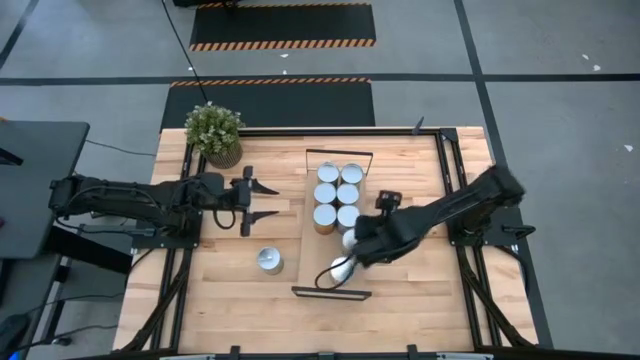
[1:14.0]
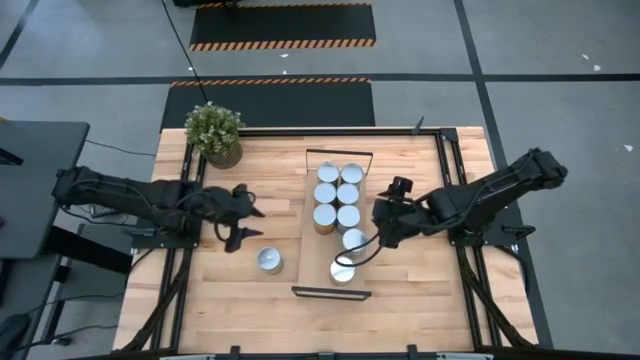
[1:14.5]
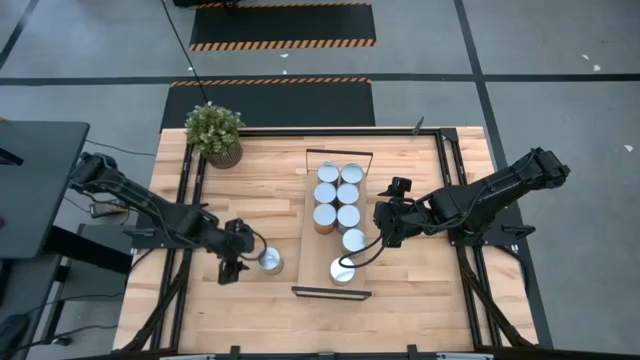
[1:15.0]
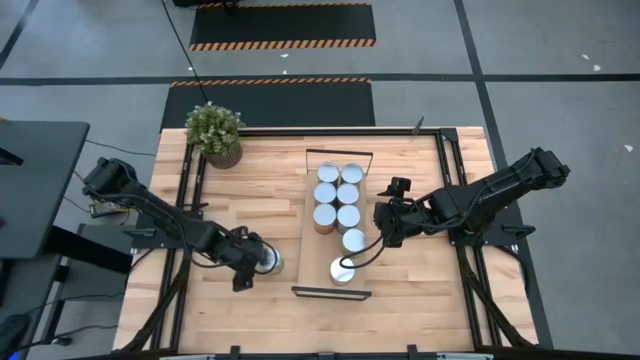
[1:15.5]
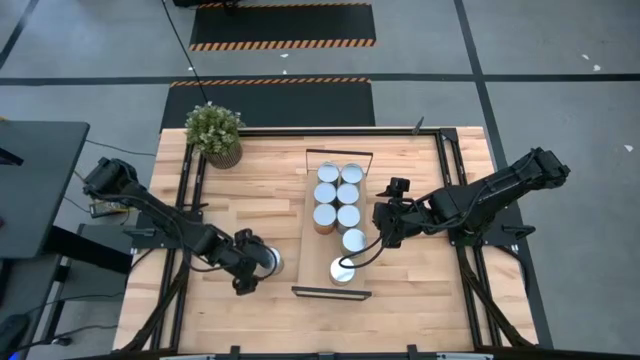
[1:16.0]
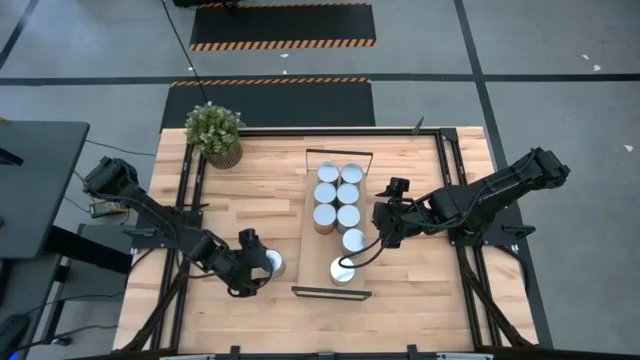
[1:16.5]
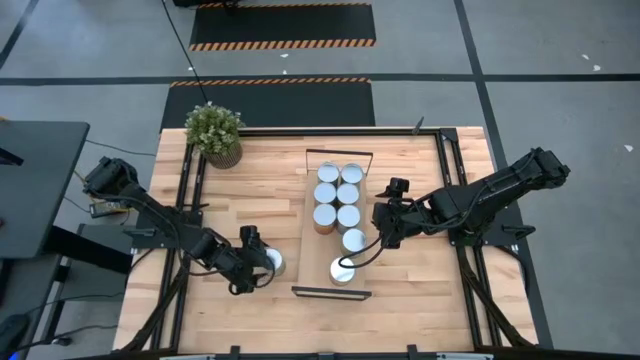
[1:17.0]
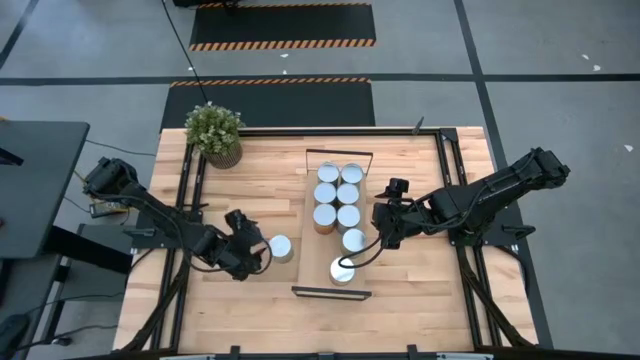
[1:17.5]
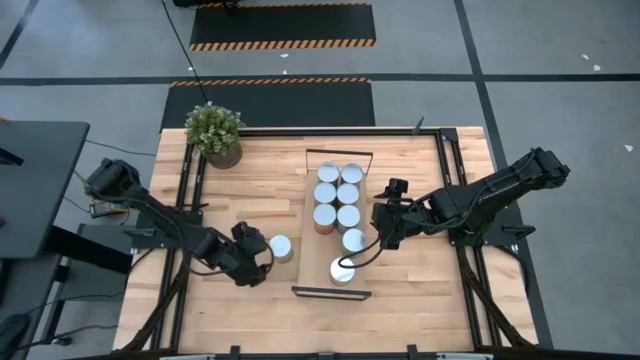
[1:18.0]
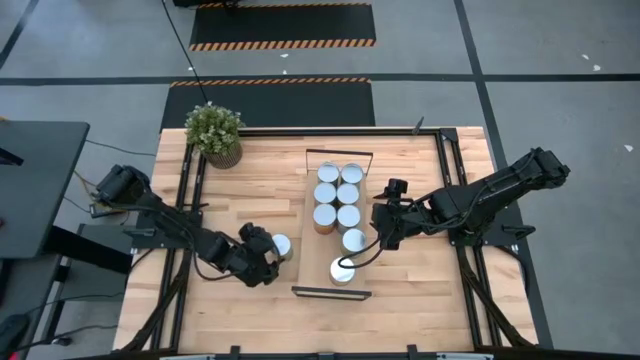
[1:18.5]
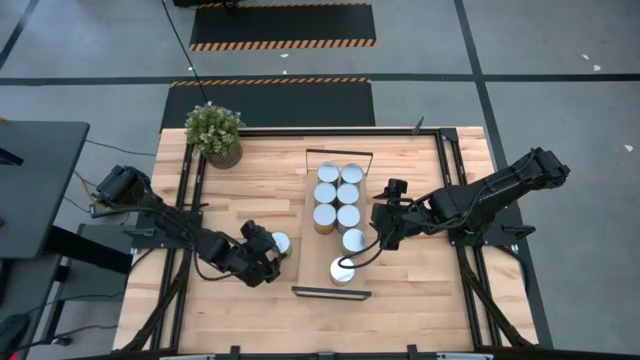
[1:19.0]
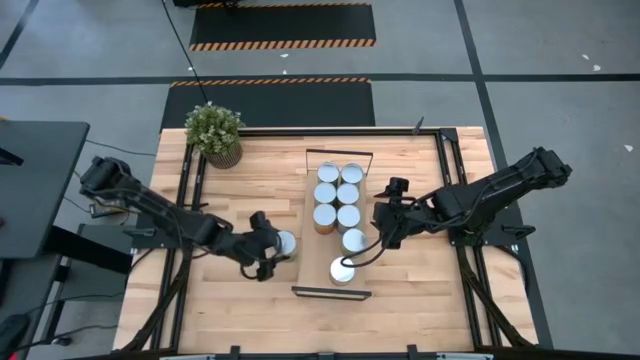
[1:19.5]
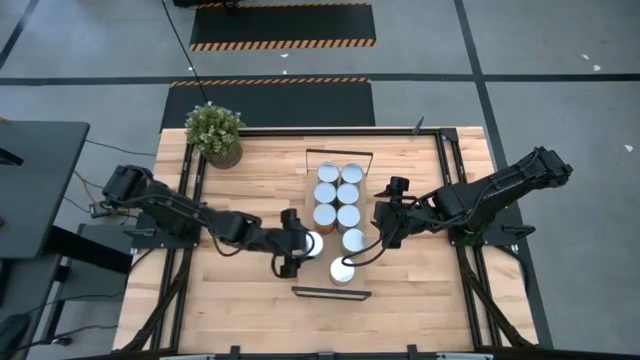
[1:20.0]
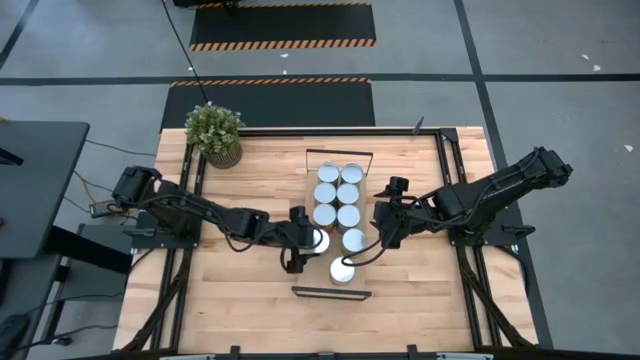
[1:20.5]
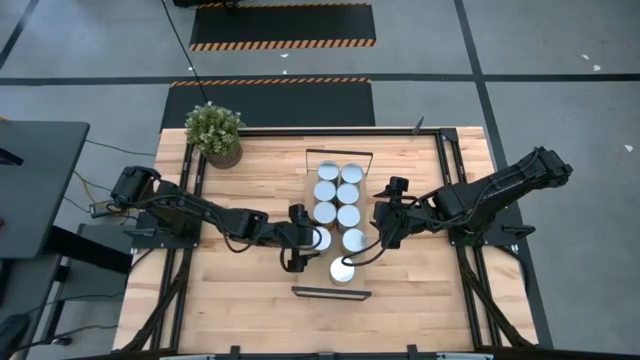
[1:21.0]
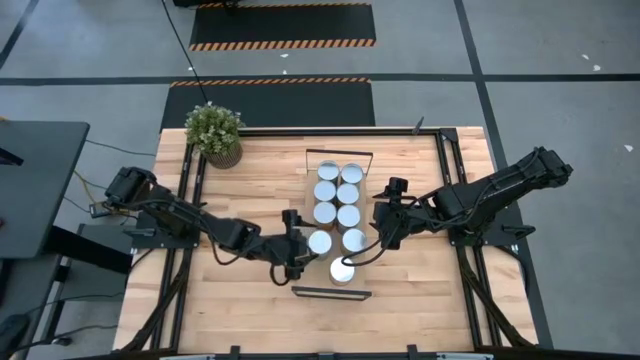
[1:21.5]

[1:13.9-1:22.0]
Task: Pick and place cans onto a shelf
Put the canned oranges on the shelf

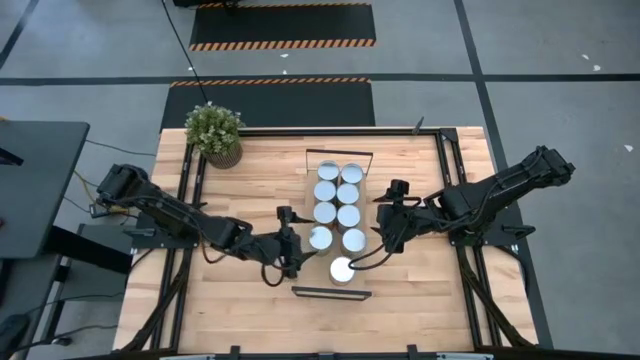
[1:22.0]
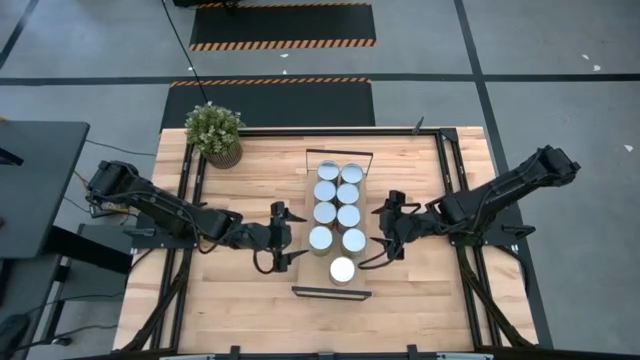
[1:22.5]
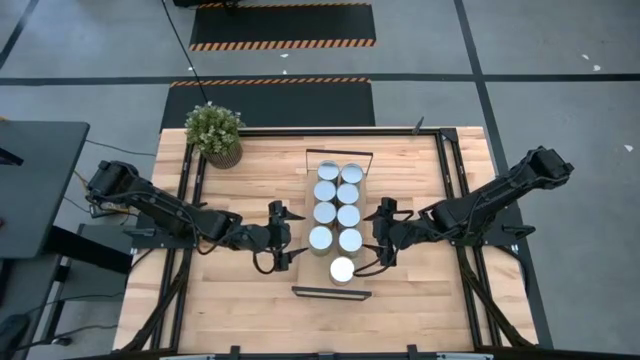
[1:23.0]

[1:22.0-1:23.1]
Adjust the canned pears can on the shelf

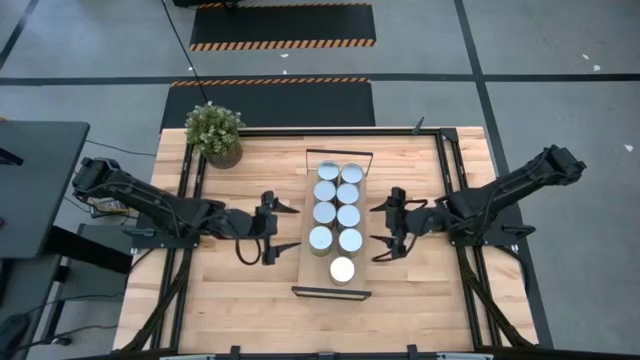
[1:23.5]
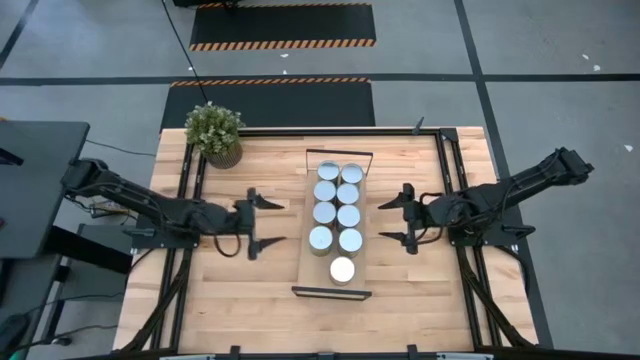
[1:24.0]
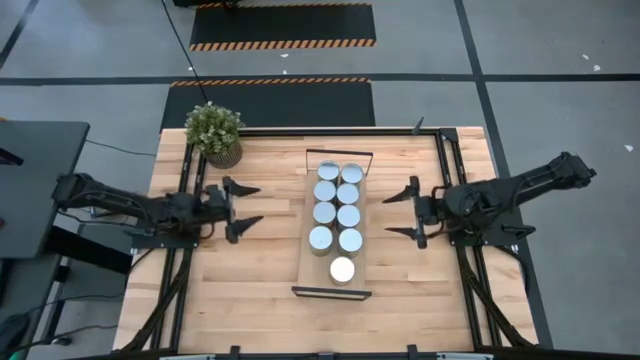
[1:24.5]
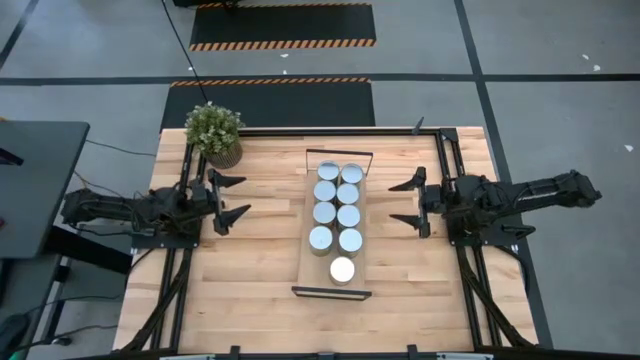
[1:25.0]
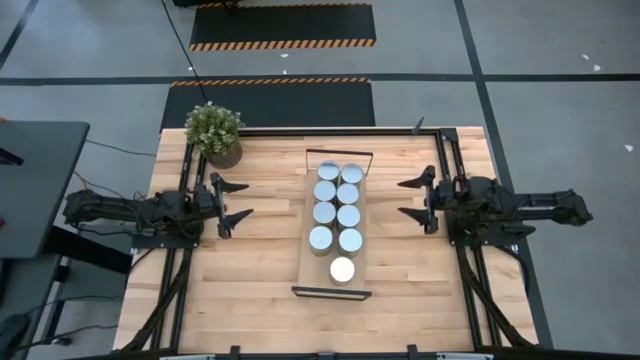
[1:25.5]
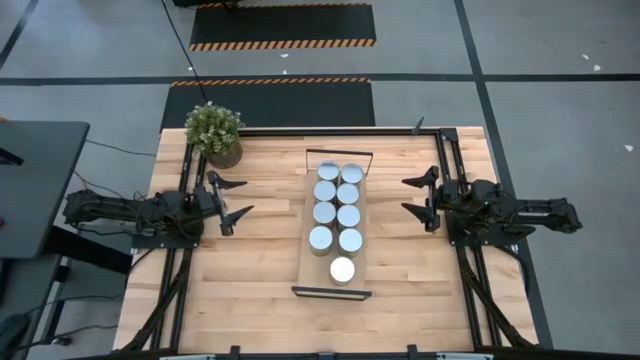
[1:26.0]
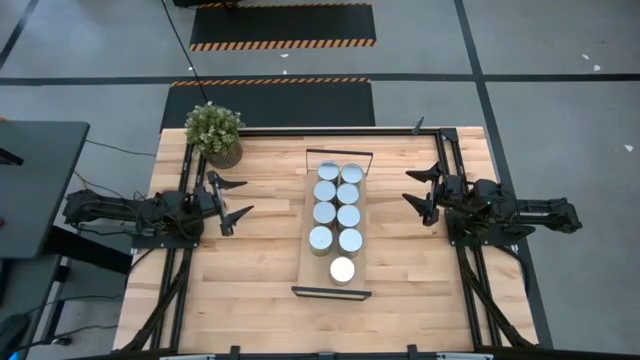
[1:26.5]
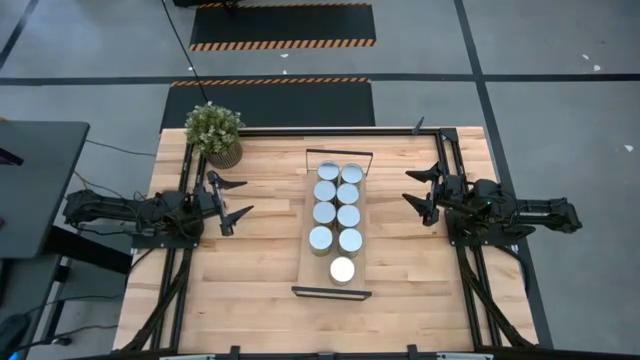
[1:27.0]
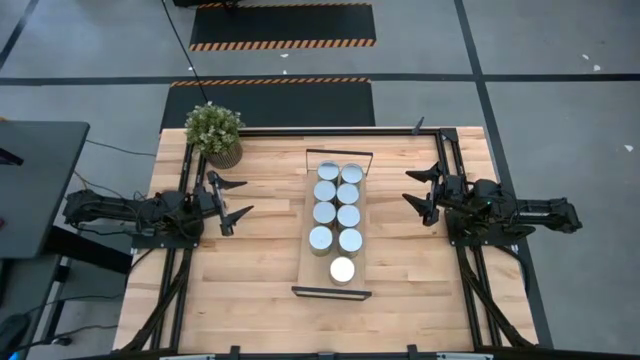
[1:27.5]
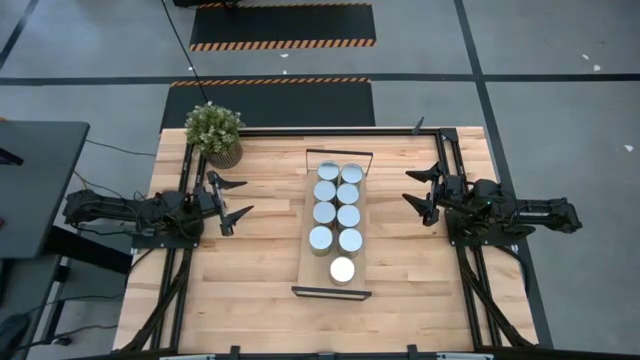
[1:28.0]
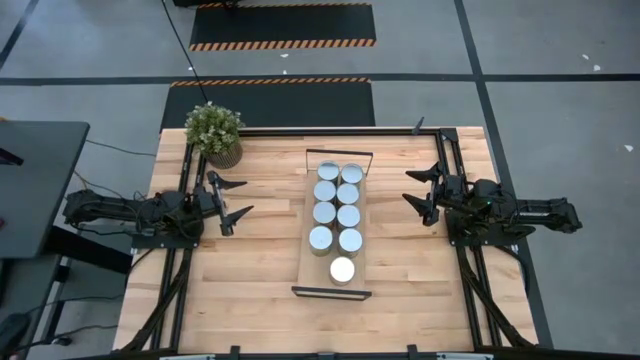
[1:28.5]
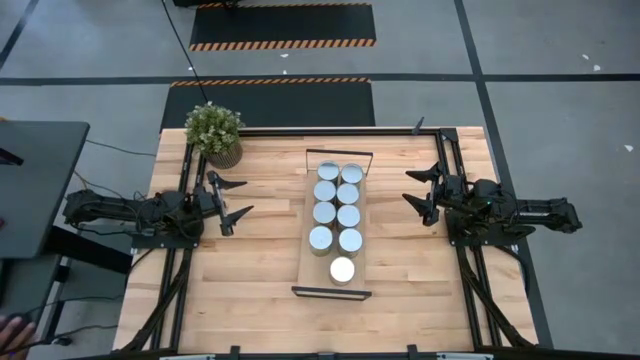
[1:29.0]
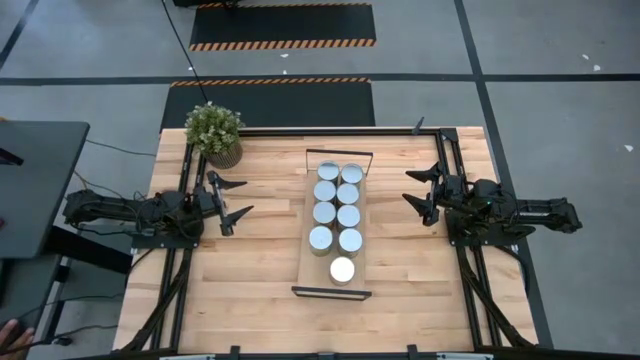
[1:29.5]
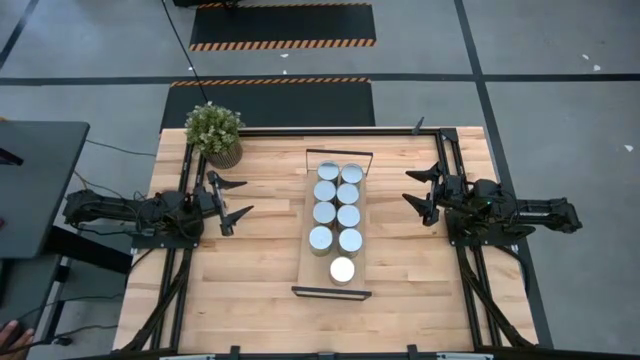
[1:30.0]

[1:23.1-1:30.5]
Return to Home Position

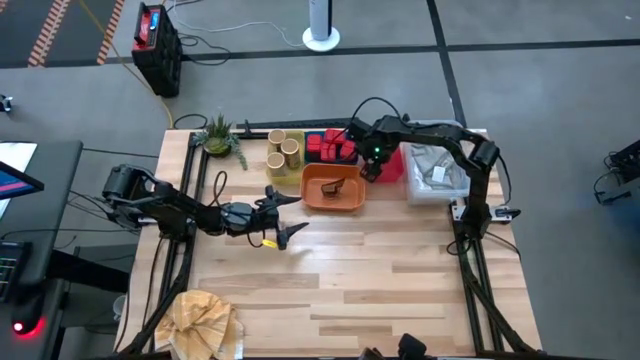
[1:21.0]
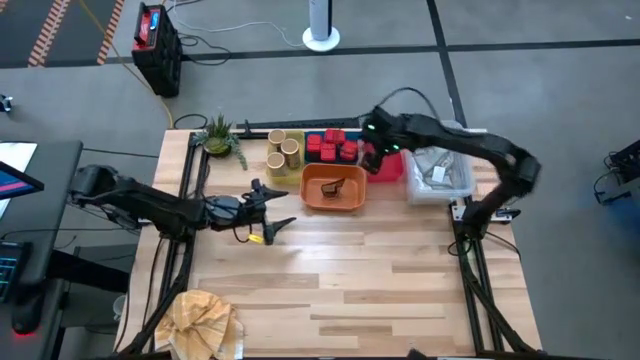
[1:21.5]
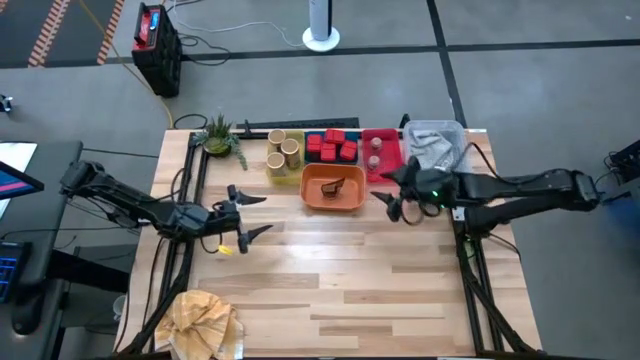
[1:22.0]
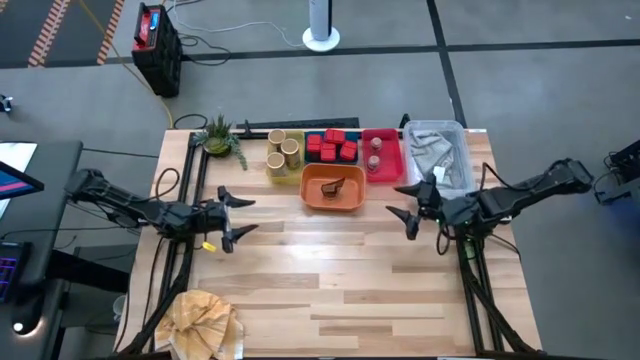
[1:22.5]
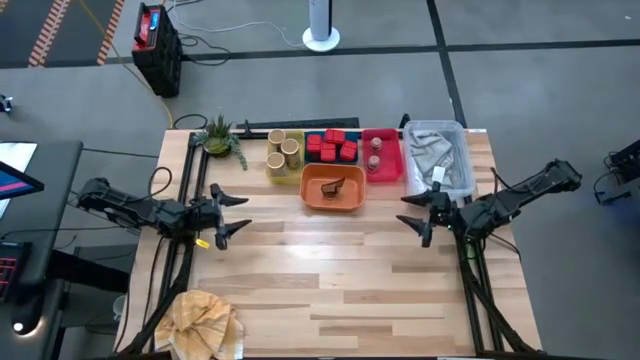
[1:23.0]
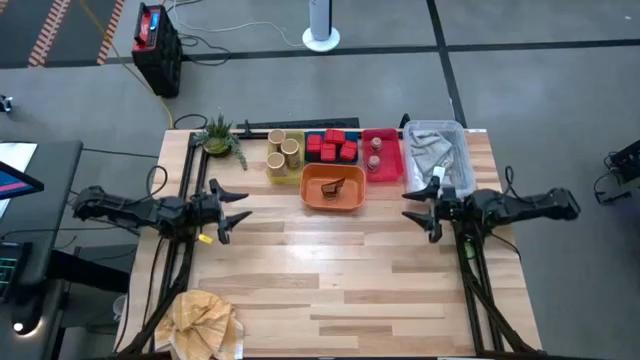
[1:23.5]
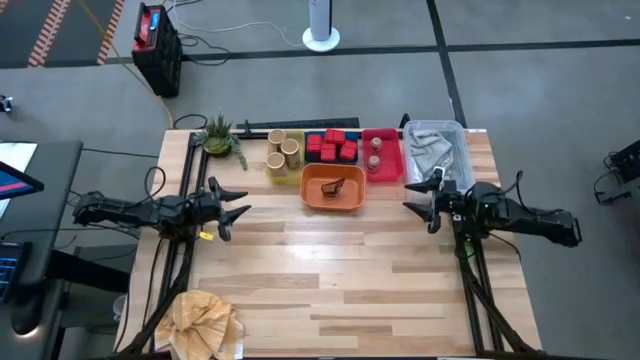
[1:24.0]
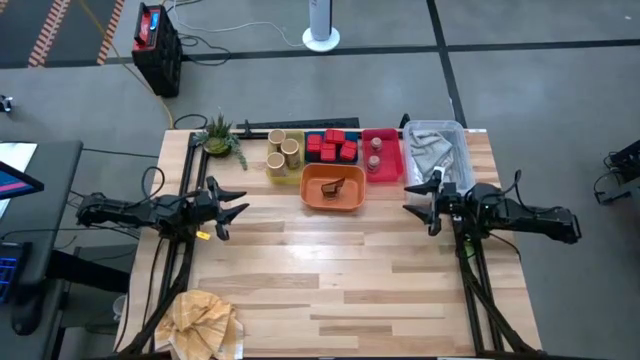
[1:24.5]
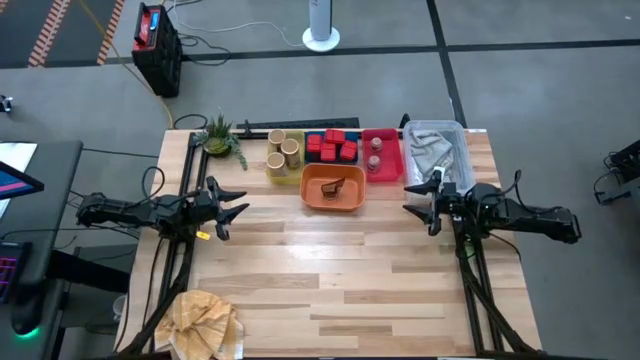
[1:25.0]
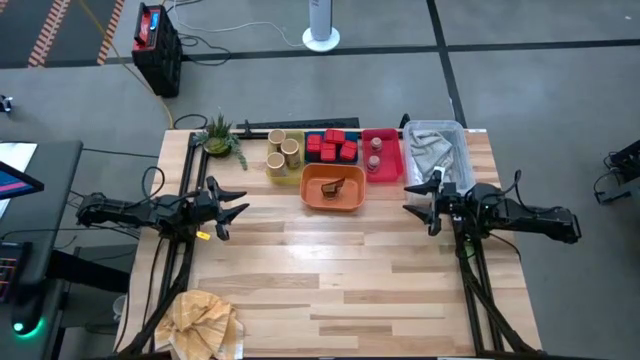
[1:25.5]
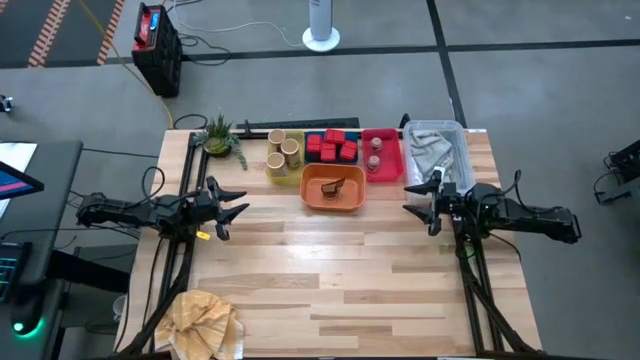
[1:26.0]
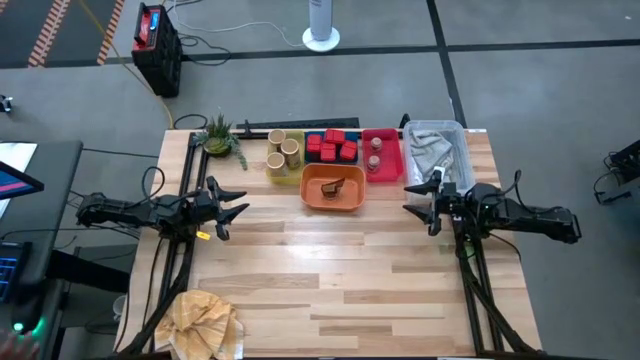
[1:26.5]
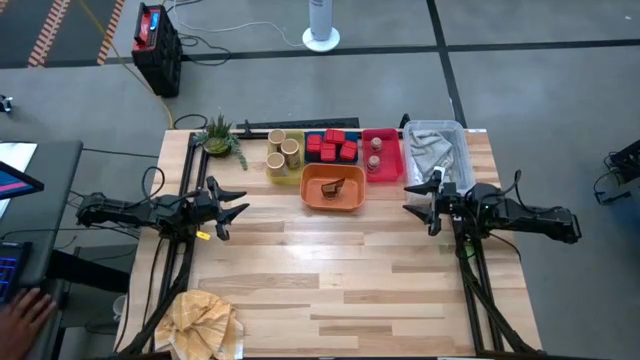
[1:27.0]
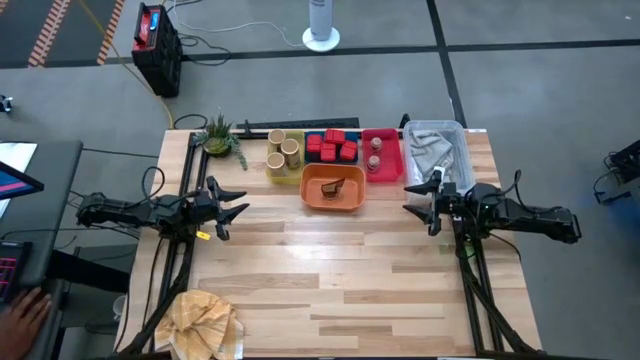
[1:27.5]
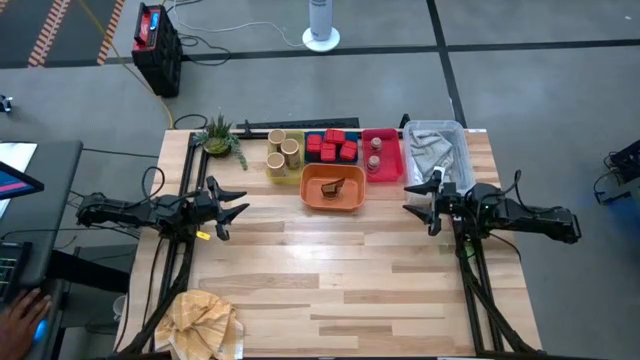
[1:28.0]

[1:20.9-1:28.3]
Task: Sort spices by type
Return to Home Position
